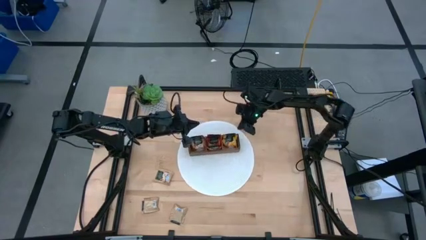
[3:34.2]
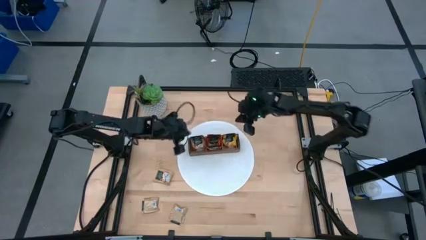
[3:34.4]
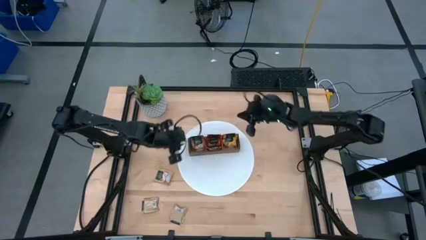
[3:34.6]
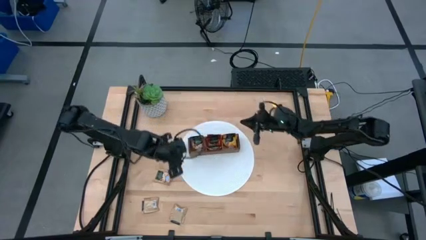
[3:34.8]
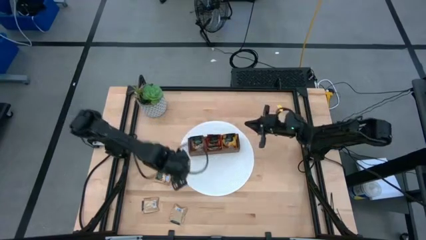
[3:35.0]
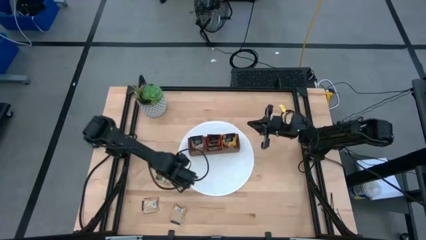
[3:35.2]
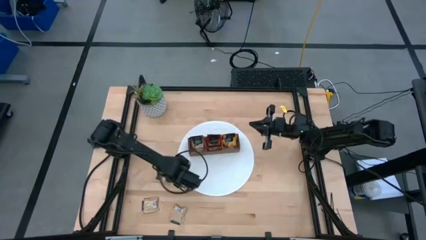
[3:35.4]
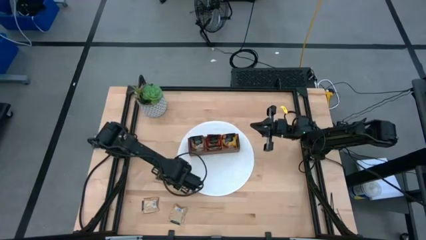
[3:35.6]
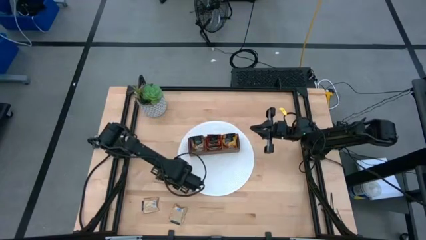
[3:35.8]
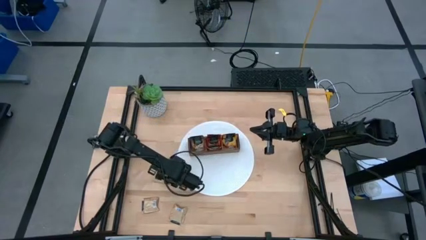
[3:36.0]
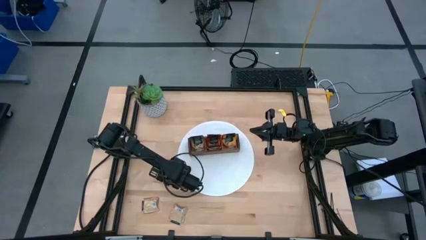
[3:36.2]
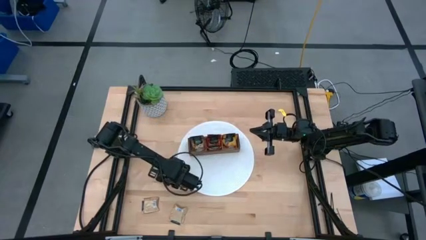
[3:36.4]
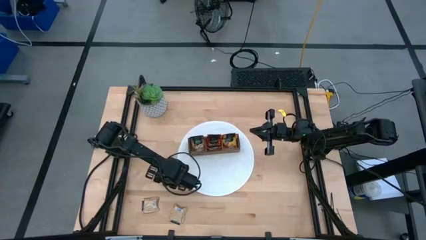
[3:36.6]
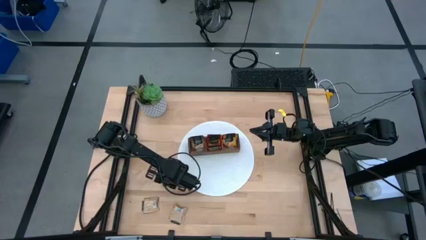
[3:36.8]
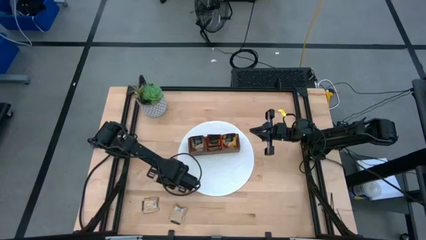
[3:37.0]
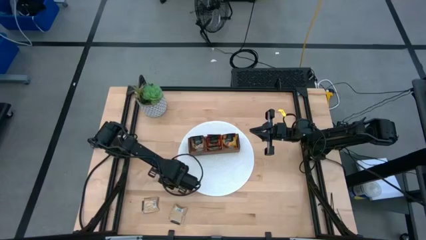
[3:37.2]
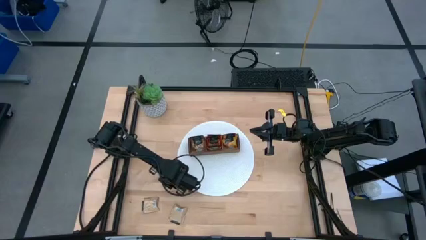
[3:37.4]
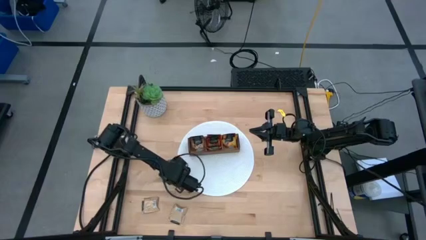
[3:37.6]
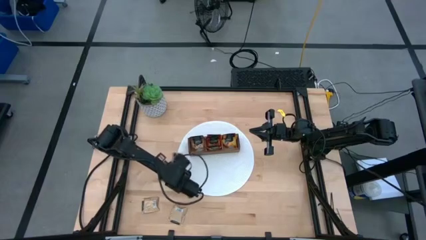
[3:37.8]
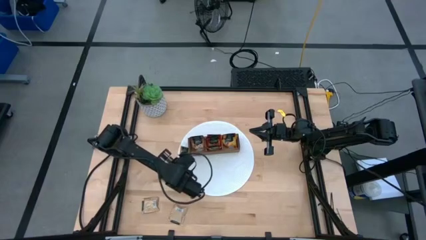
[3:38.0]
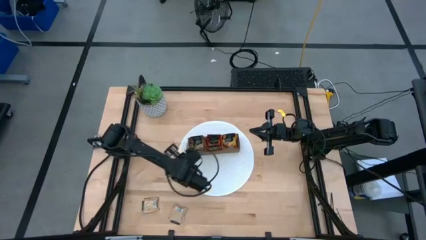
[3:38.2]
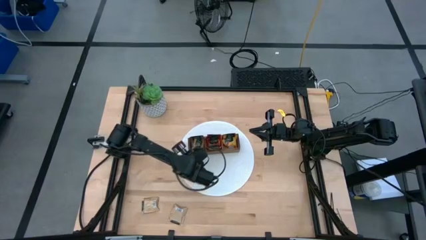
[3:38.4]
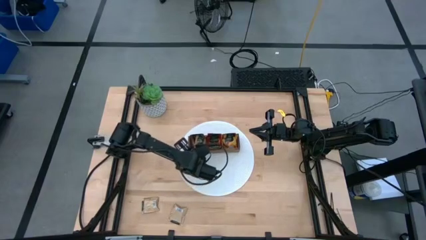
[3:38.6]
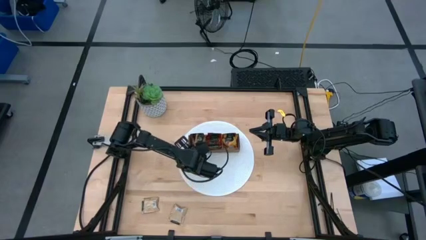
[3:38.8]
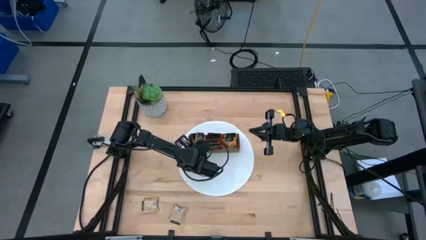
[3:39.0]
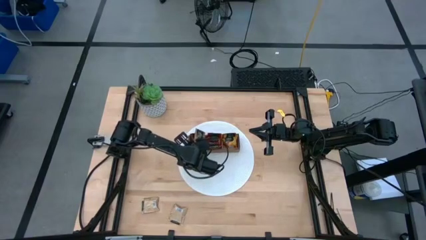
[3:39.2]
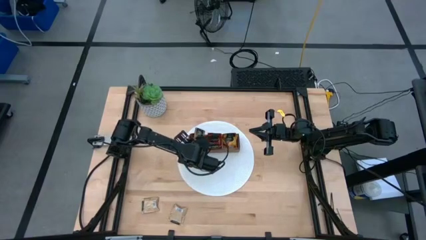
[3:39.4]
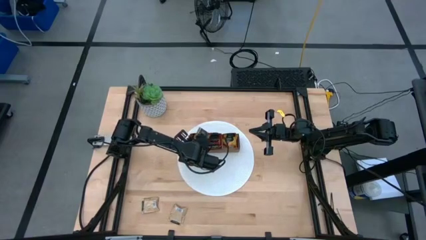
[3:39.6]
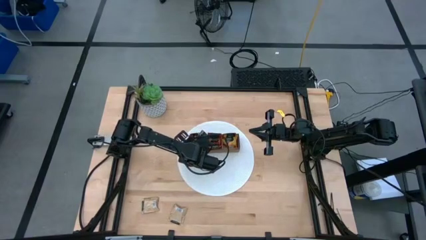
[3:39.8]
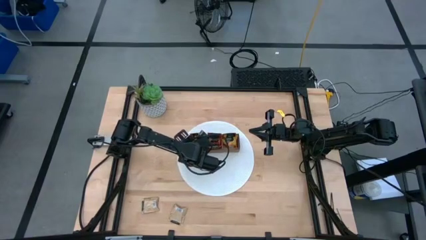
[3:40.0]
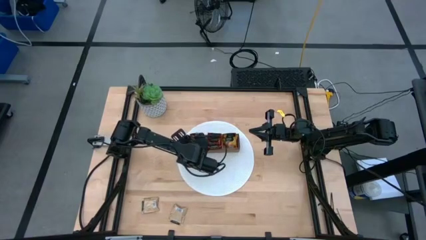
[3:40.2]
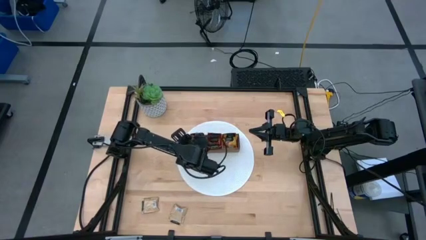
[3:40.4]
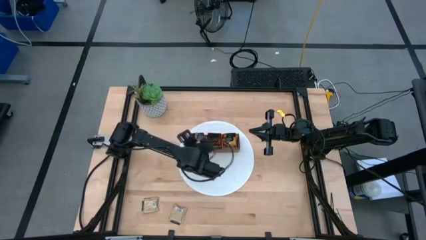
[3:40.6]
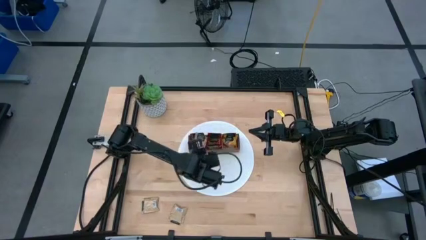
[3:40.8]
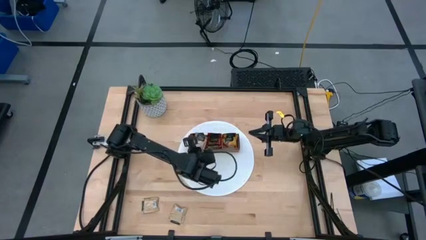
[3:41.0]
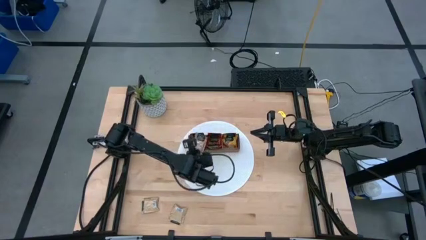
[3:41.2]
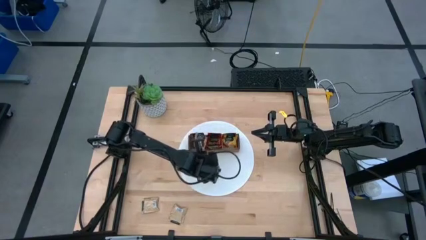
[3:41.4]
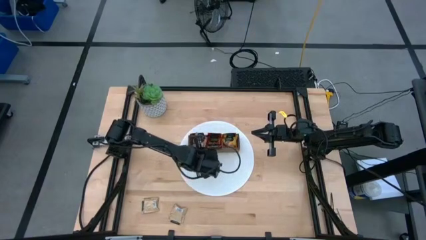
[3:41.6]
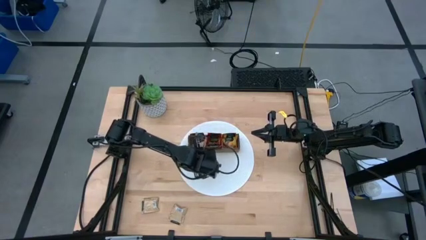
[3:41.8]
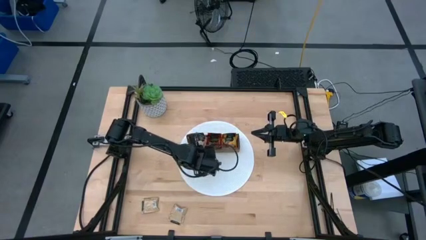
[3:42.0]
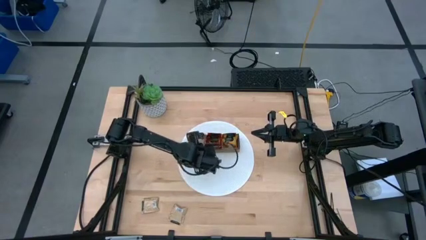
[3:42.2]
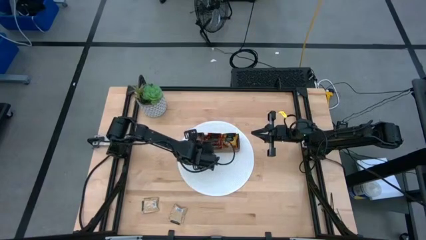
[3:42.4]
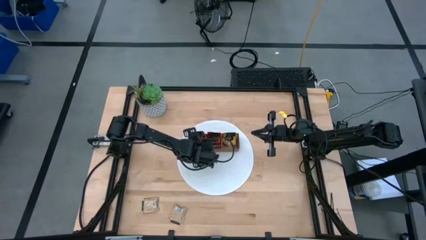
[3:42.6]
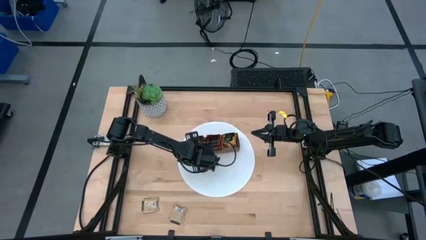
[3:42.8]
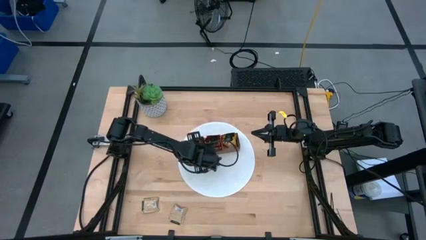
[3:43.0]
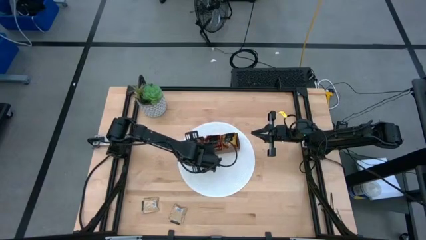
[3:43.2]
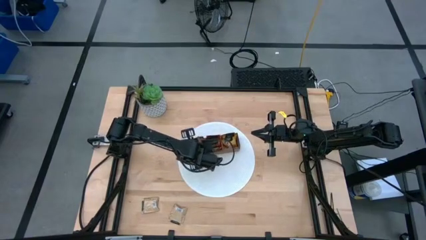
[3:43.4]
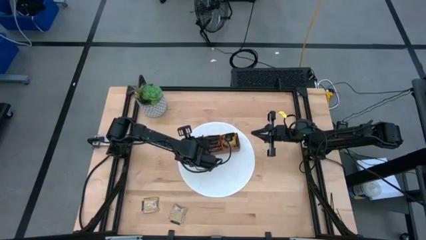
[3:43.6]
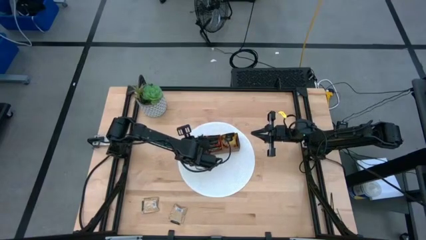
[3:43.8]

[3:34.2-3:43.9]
Task: Pick & Place Tea
Put the brown tea bag into the left section of the wooden organizer

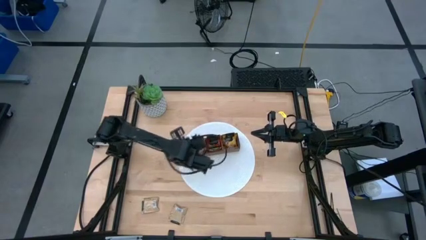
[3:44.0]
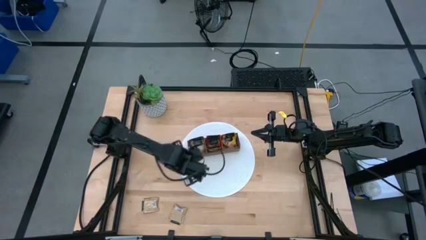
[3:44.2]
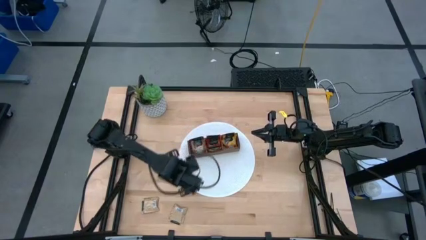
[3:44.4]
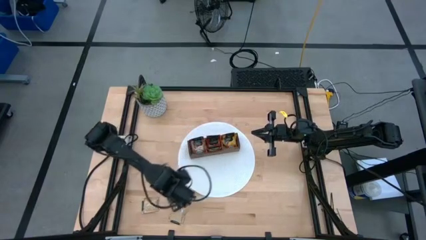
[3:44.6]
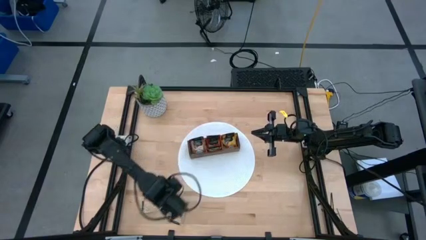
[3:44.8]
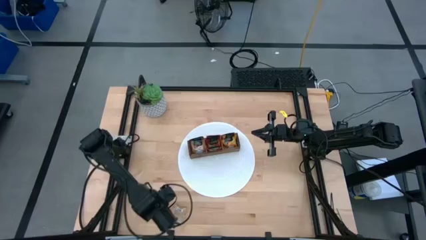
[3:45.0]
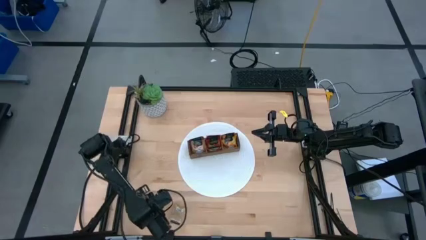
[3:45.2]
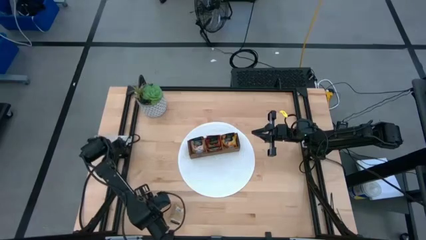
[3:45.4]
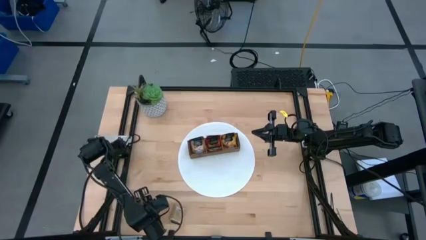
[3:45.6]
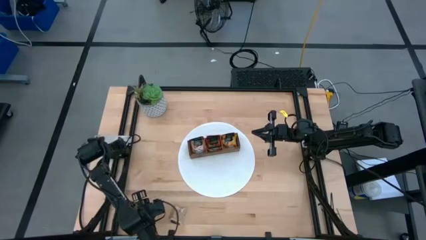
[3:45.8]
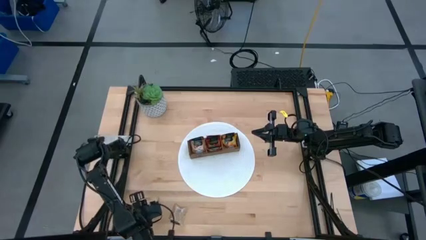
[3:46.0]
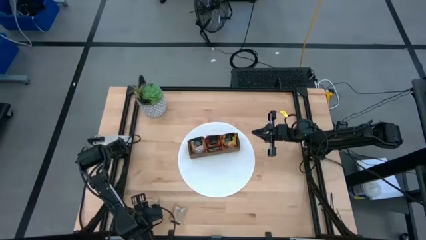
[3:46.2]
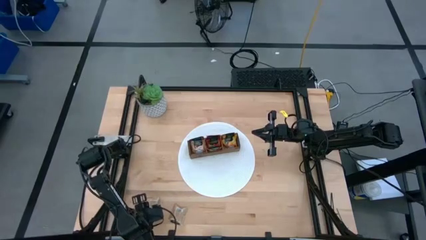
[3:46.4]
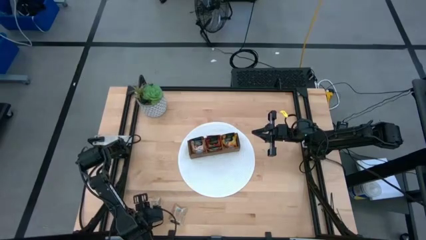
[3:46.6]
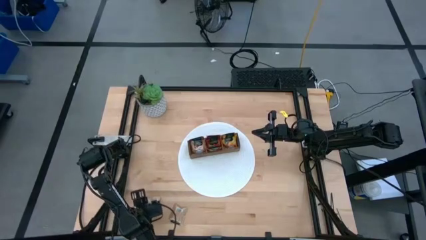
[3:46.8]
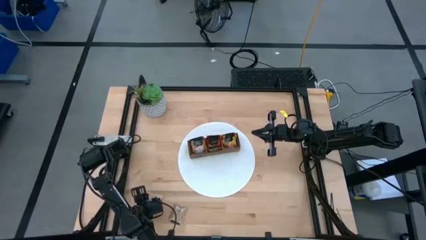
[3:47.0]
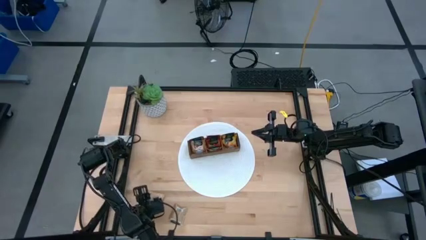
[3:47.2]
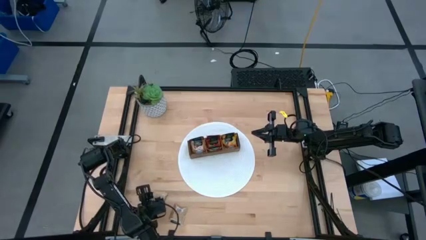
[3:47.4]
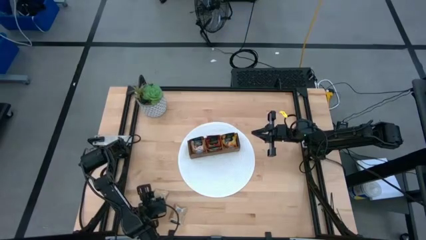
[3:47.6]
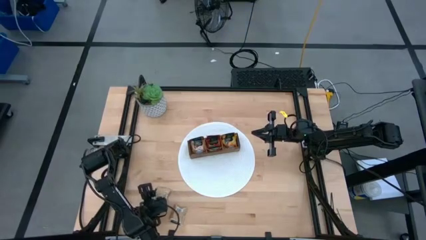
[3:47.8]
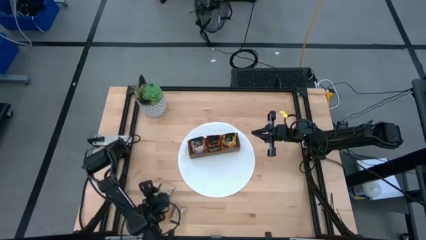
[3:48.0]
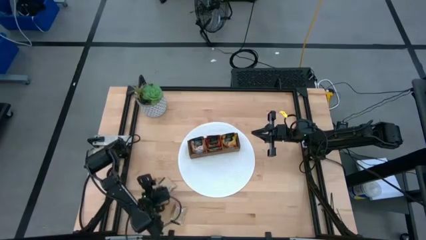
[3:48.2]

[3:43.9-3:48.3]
Put the brown tea bag into the left section of the wooden organizer
